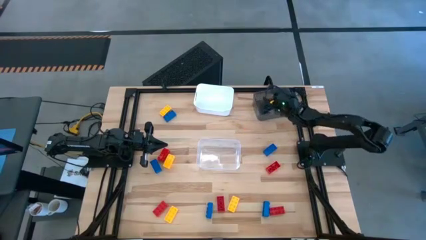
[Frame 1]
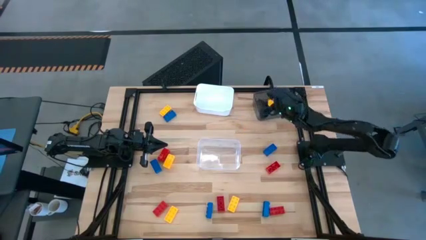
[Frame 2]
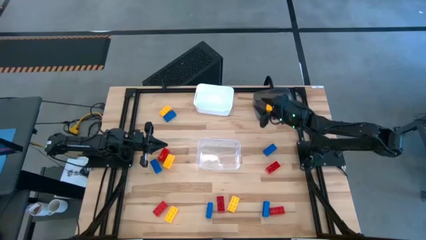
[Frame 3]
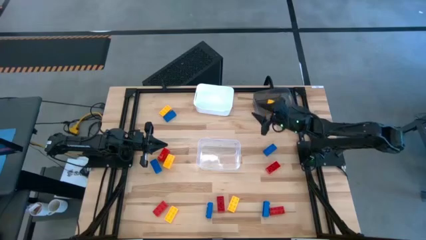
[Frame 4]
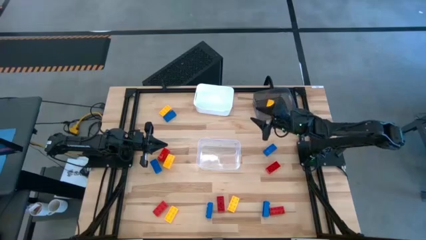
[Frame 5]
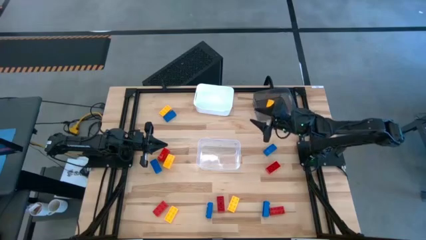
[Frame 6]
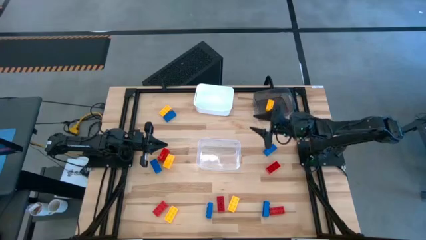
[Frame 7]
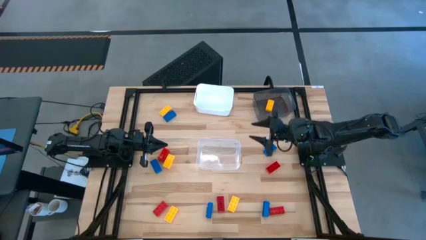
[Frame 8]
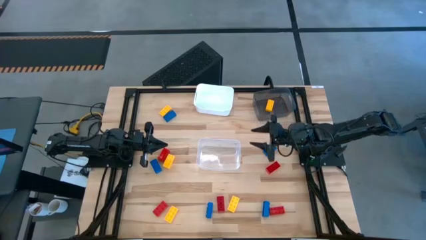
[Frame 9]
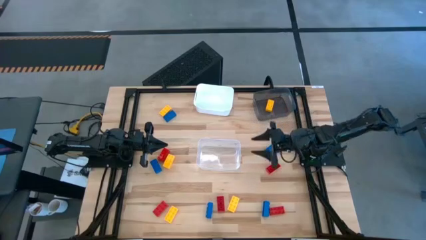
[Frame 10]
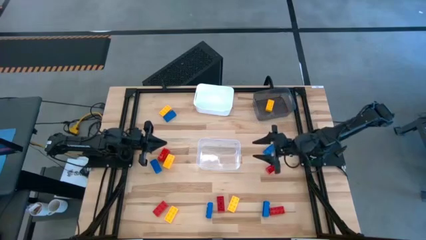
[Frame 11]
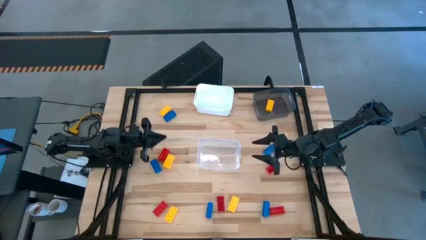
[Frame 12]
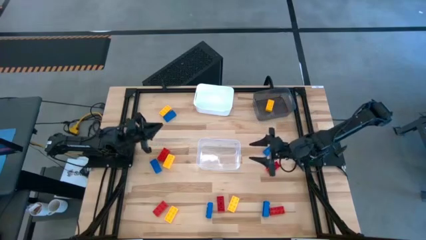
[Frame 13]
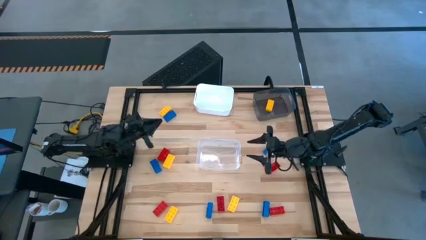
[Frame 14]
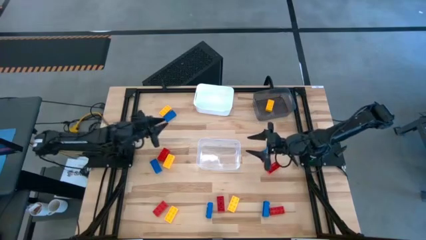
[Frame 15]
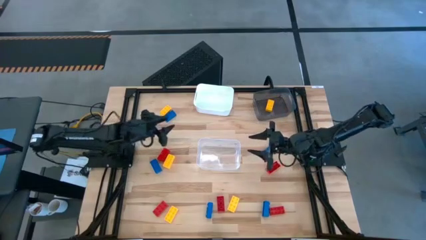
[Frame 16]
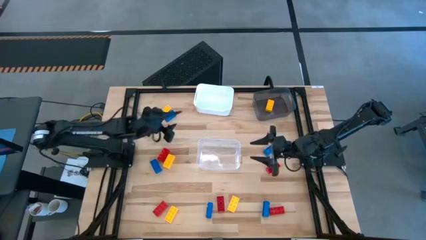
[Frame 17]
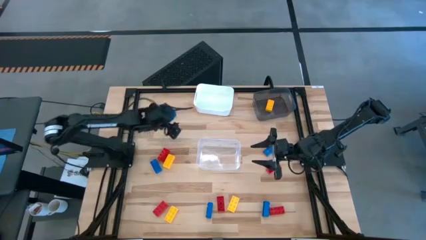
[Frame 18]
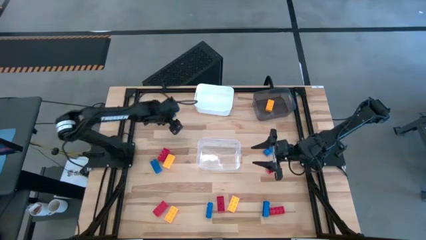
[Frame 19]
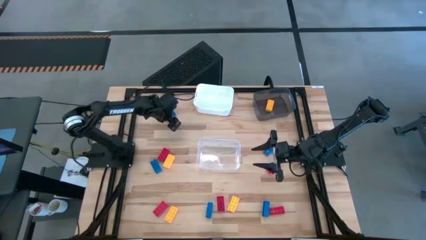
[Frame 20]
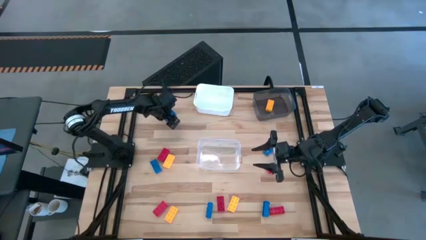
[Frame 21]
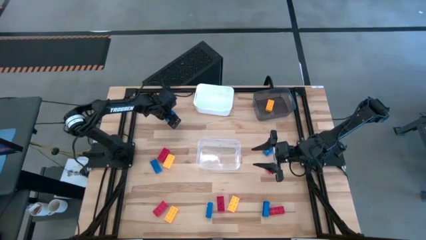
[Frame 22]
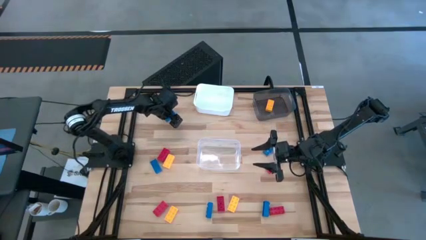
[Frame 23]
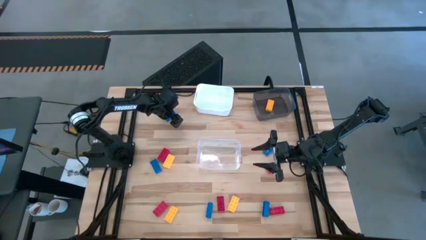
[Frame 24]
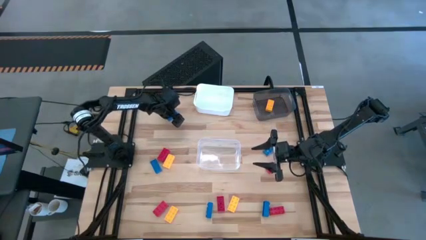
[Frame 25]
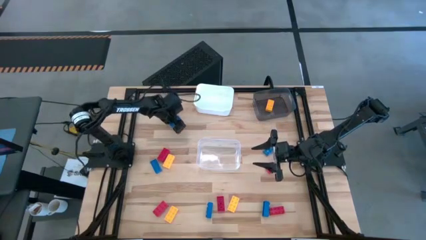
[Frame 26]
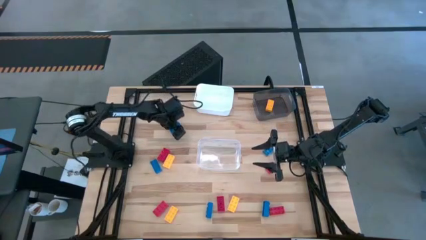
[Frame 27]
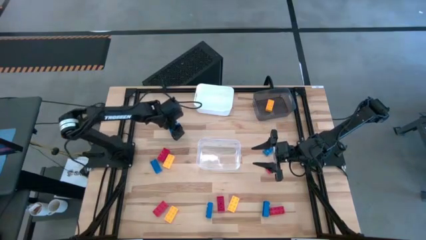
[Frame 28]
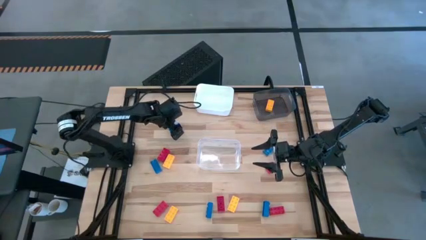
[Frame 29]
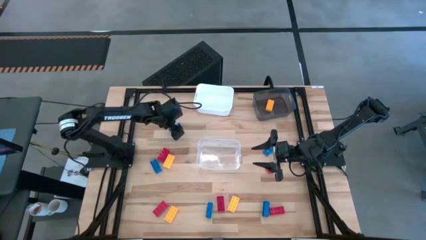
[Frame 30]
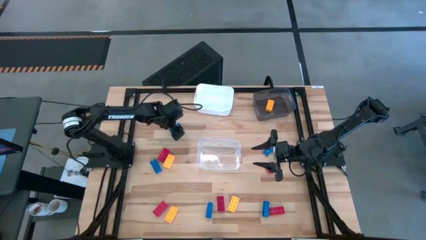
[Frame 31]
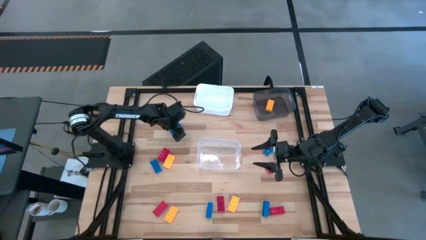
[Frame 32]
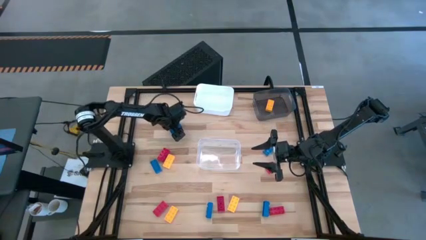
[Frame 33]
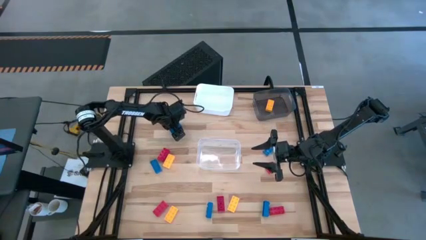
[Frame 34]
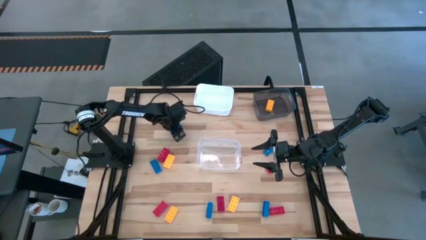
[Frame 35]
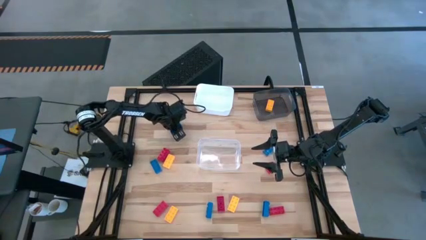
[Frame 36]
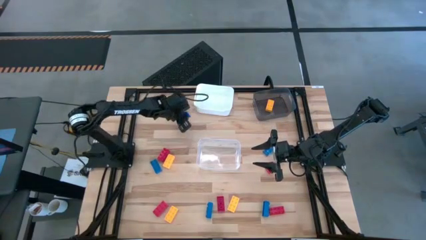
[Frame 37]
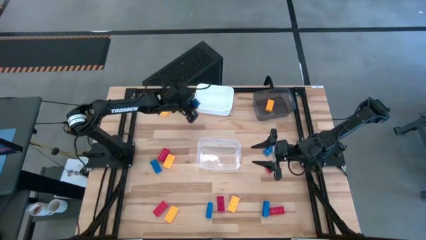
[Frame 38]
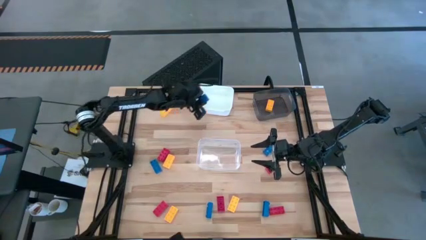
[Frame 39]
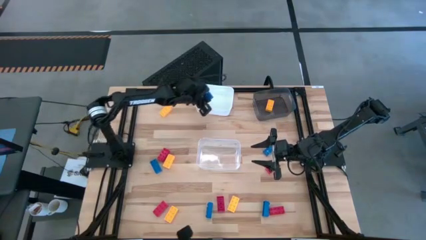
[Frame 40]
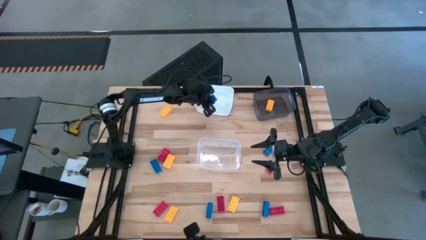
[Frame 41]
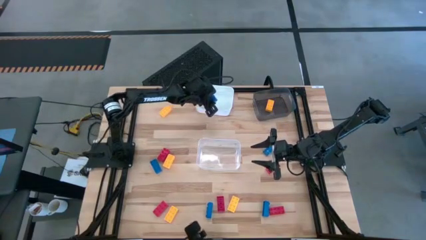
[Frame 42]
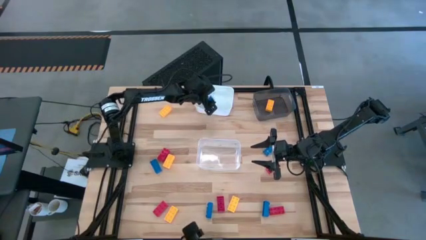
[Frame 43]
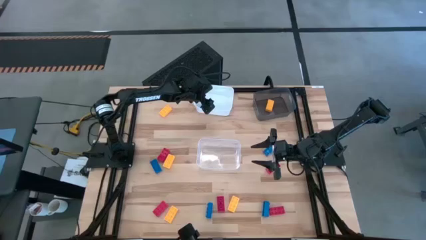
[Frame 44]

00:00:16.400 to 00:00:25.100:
Task: Sort & place blocks by color
Put the top left blue block into the white bin

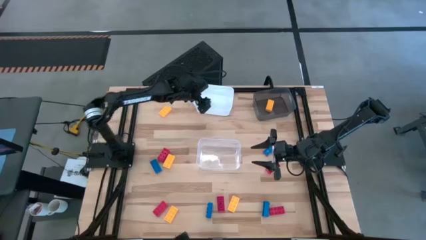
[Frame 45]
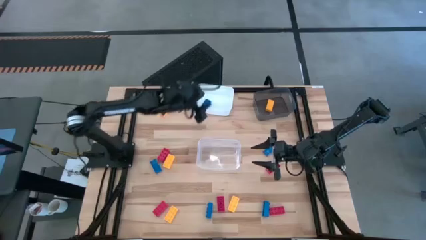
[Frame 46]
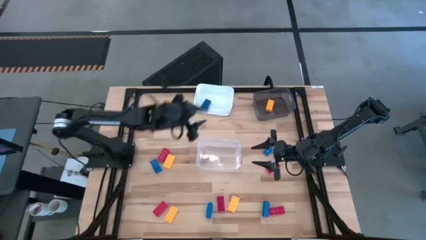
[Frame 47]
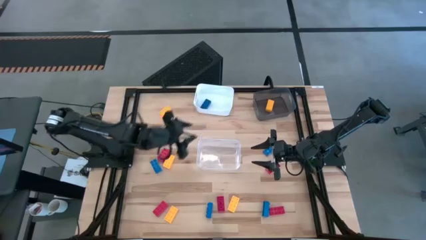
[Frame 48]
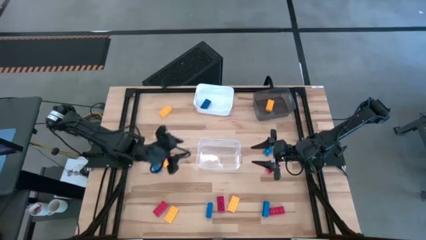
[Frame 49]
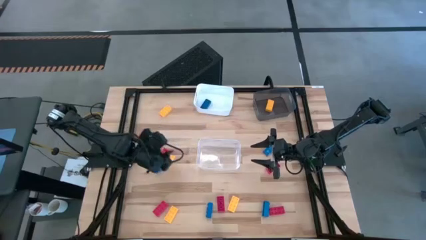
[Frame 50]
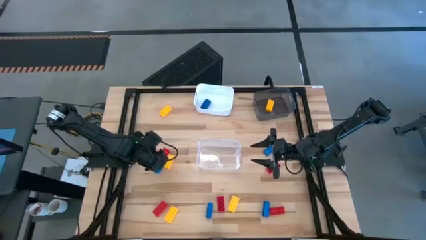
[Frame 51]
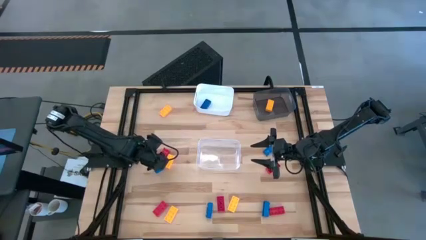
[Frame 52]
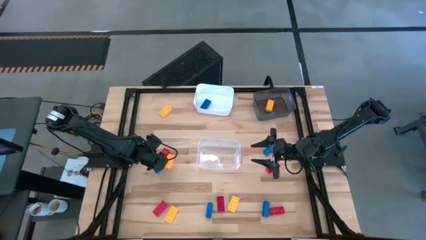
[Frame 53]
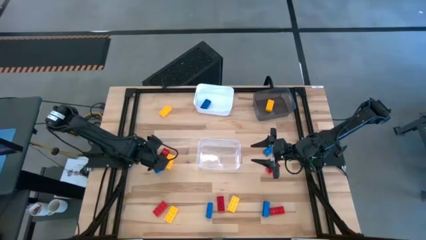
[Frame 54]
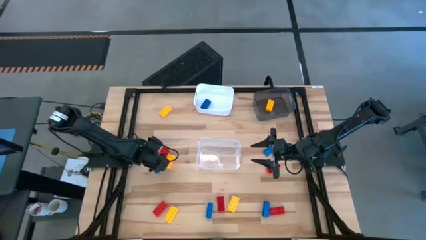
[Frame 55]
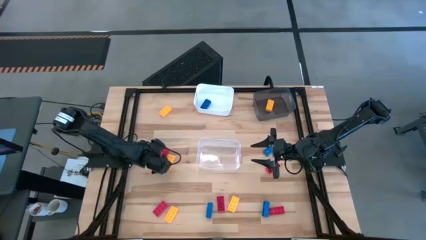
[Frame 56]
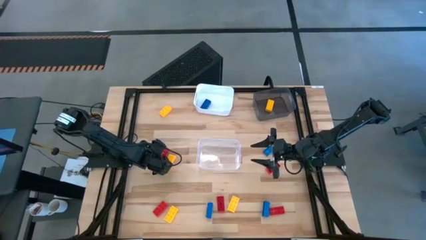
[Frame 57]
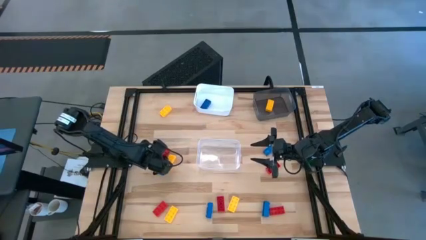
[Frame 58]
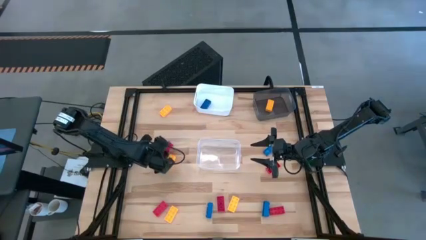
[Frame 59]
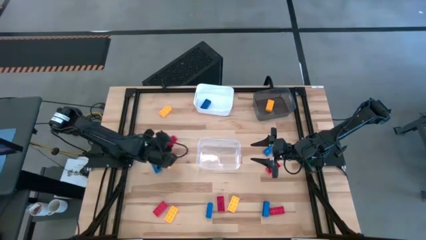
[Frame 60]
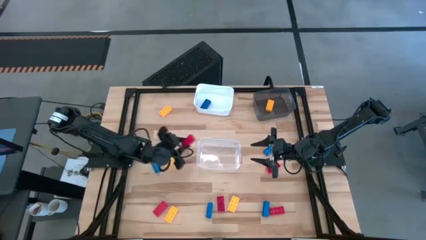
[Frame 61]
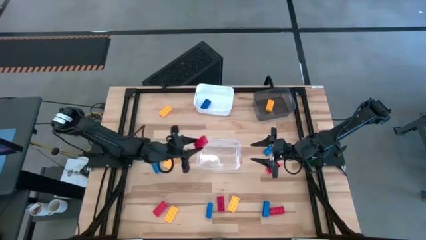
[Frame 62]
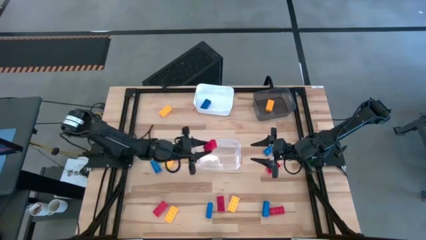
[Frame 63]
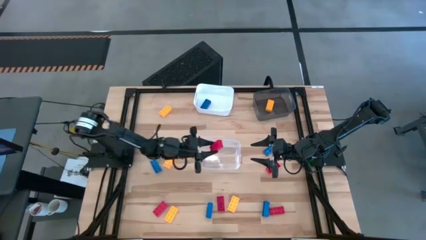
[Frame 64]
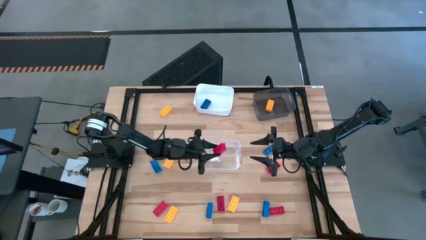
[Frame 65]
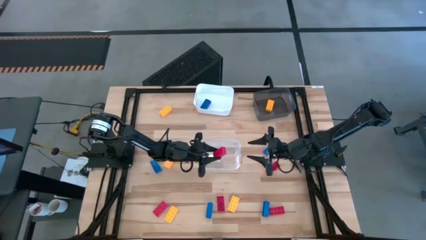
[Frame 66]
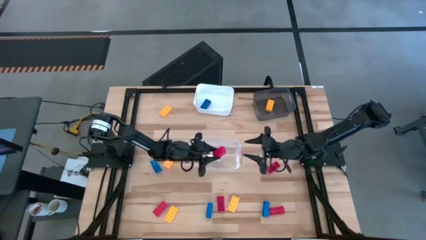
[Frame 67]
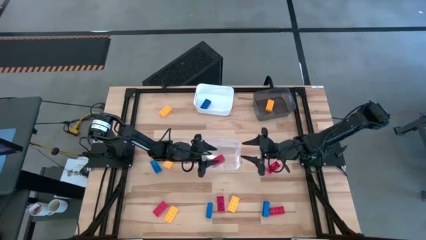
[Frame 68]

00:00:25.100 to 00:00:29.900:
Put the top left red block into the transparent bin

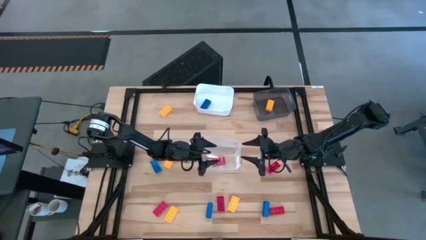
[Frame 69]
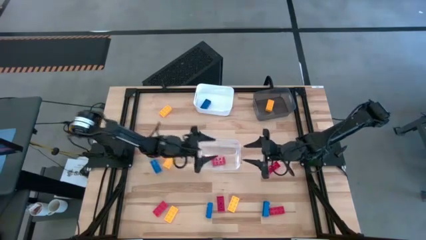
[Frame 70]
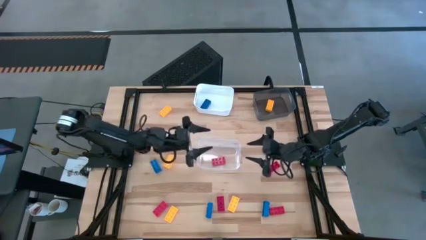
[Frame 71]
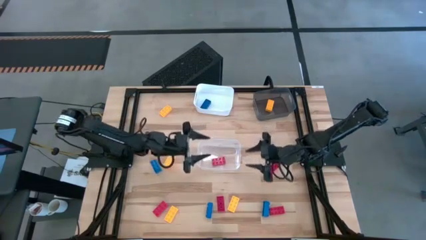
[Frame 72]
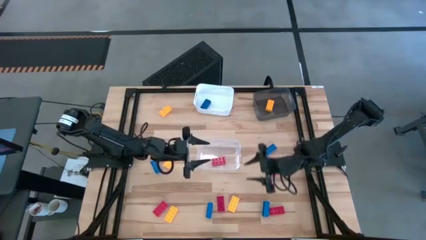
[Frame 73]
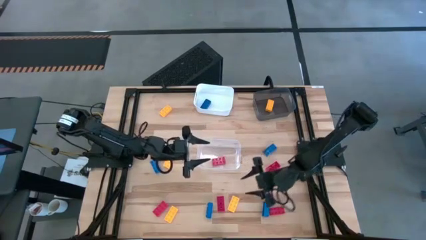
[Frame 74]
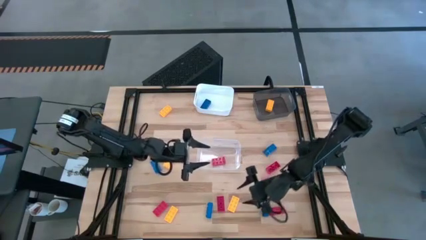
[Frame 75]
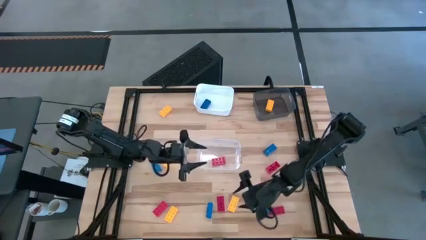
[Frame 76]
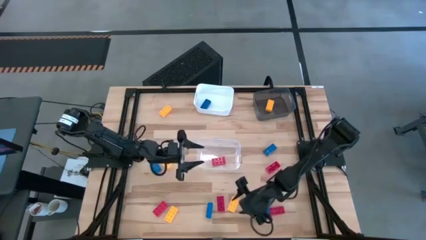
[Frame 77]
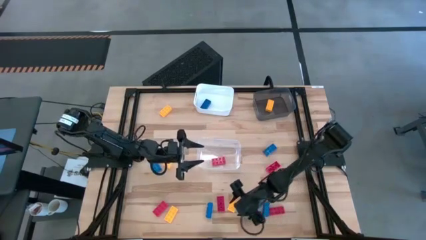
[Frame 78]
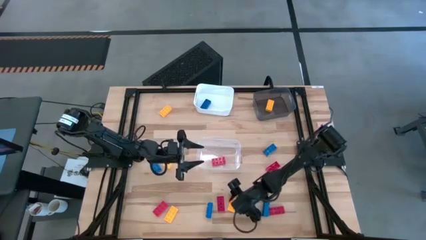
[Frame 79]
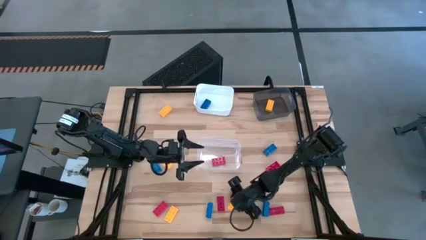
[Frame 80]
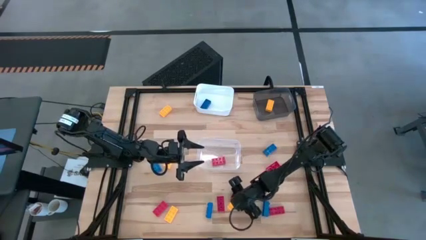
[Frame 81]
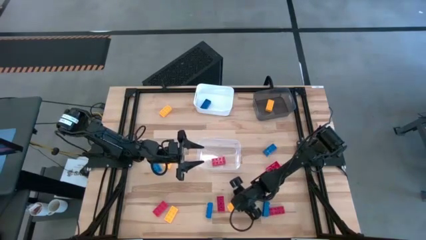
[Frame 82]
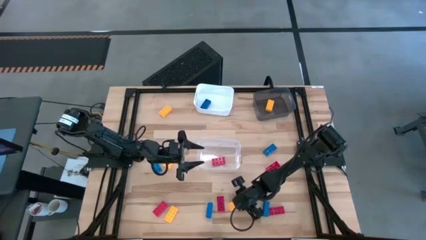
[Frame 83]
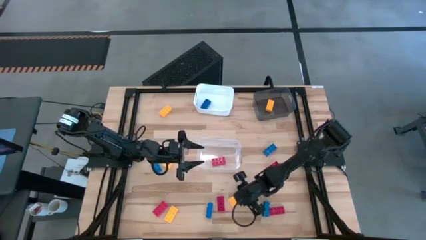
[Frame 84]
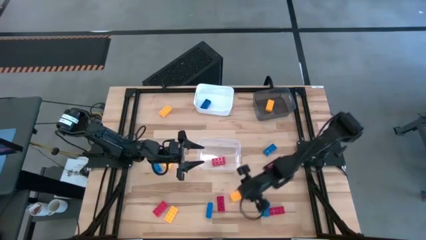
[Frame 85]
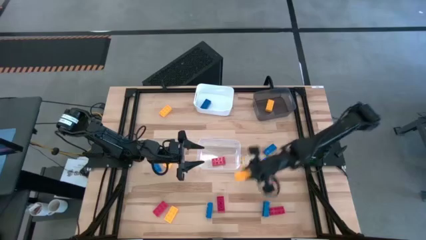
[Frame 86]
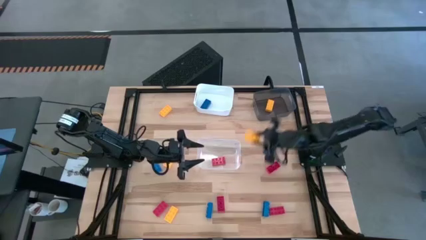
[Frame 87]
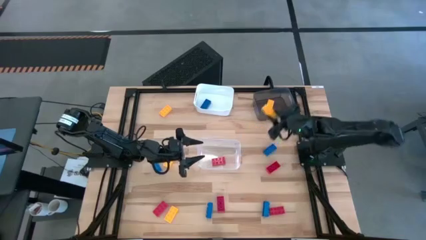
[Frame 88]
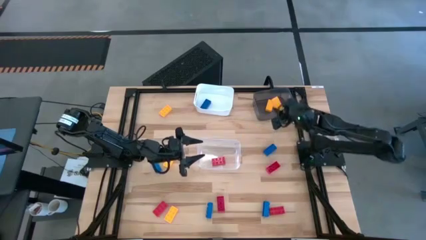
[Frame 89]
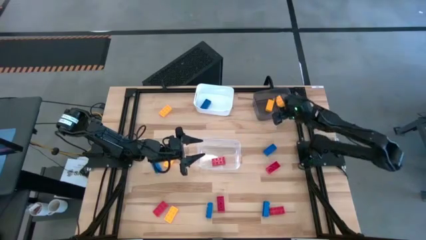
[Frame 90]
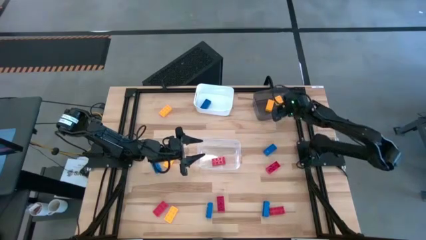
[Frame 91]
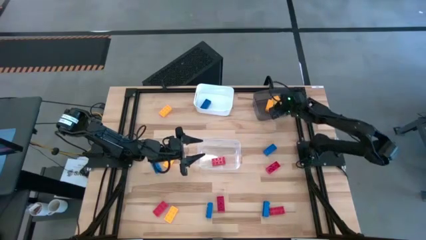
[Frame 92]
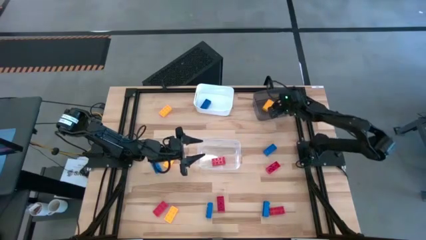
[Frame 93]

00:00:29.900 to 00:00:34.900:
Put the bottom right yellow block into the black bin
